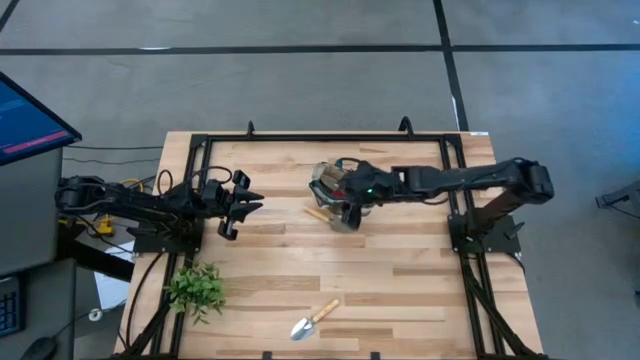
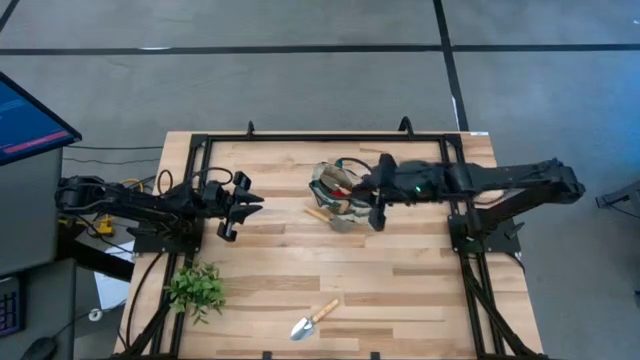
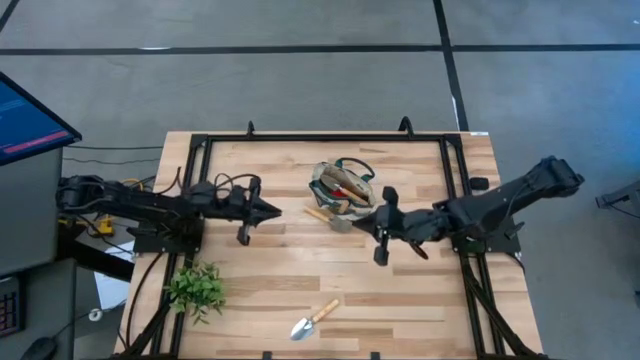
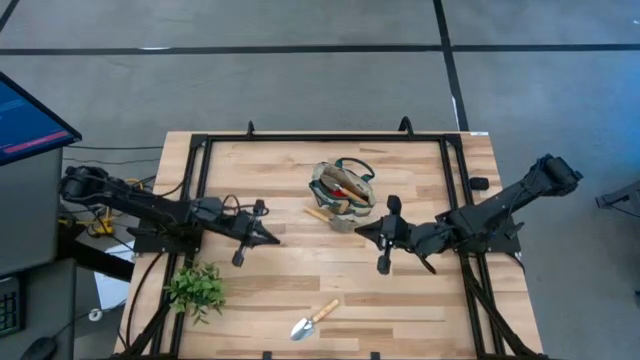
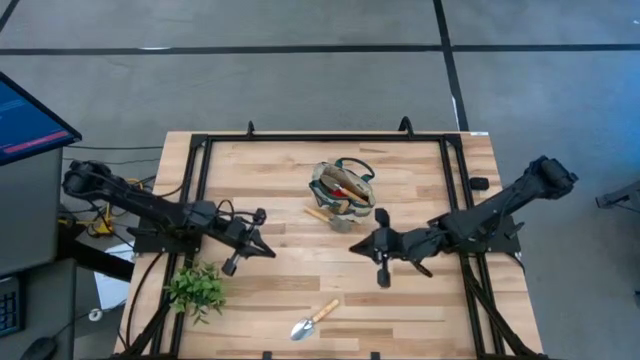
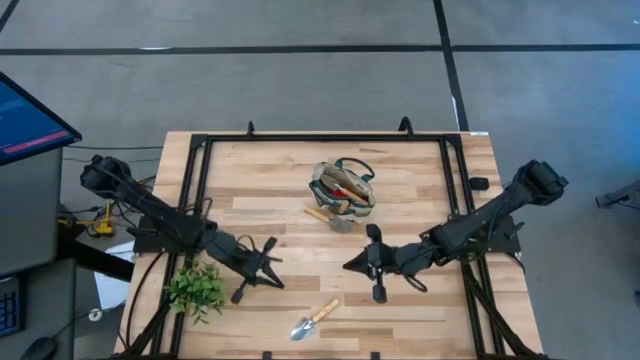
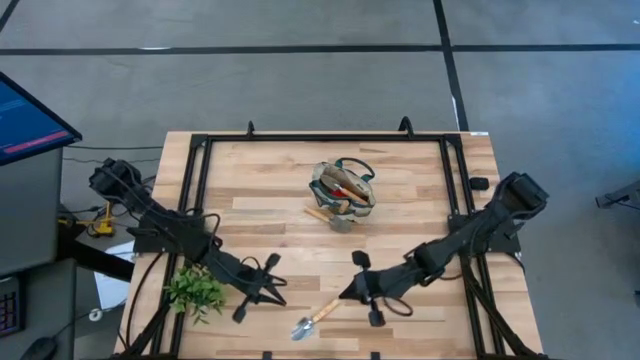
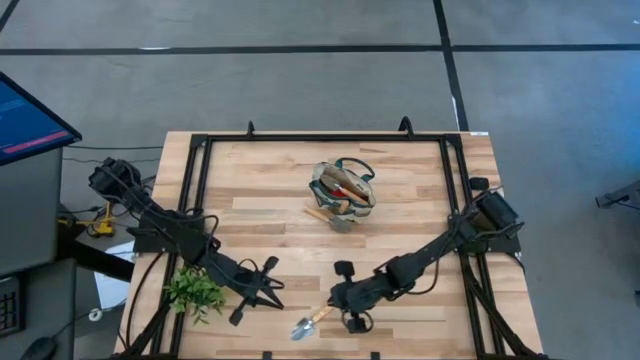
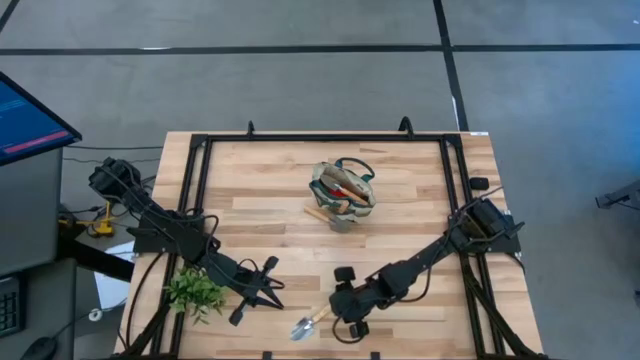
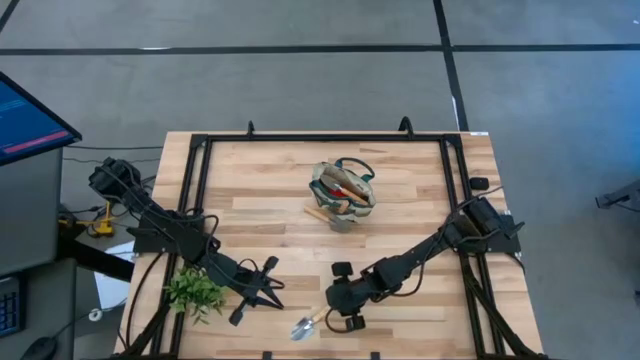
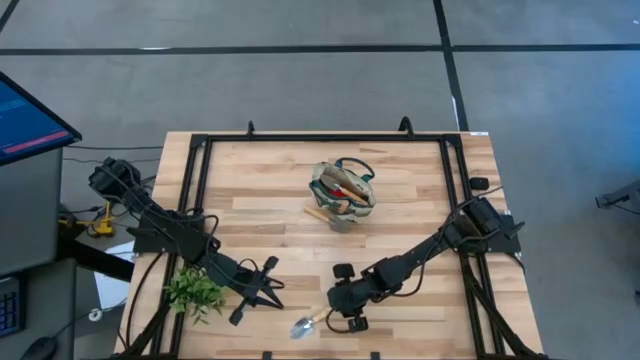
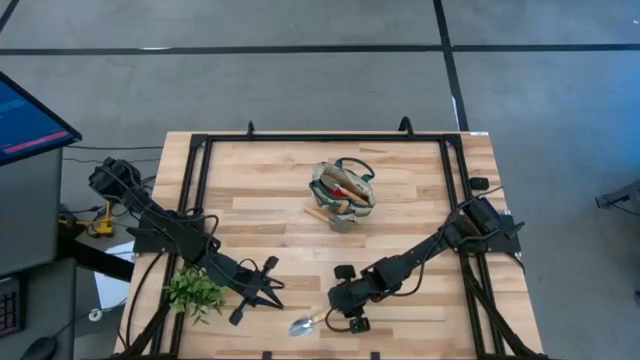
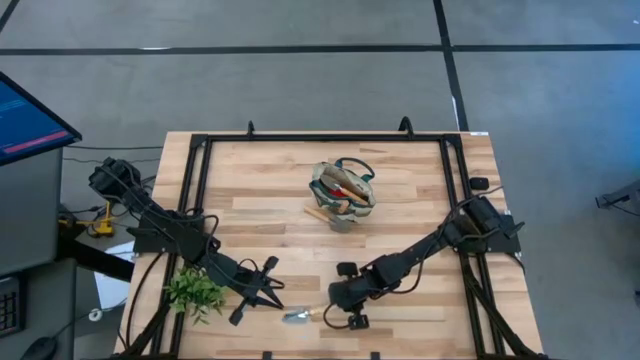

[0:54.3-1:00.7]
Task: Pick & Place Garden tools in Gardening bag
Put the brown trowel into the gardening bag

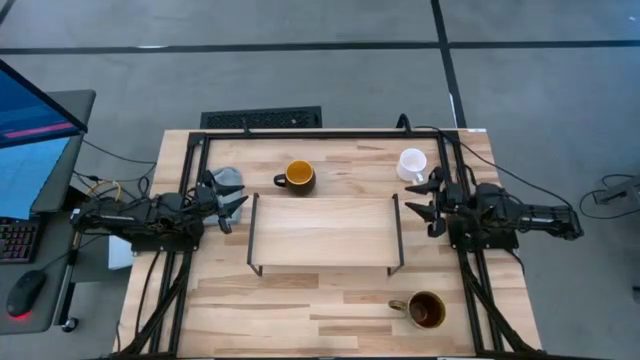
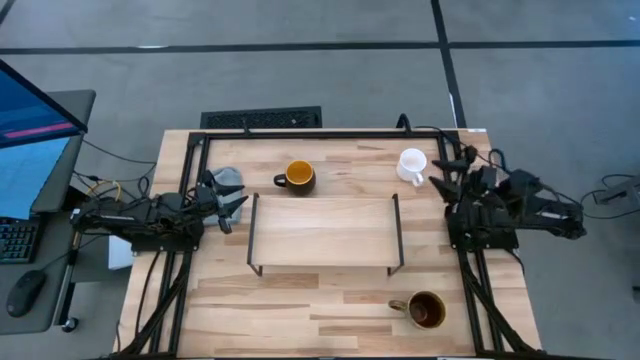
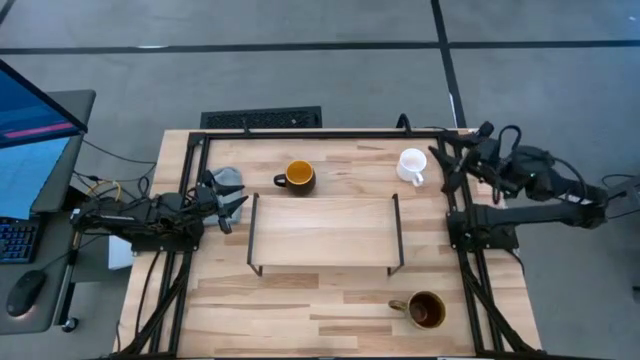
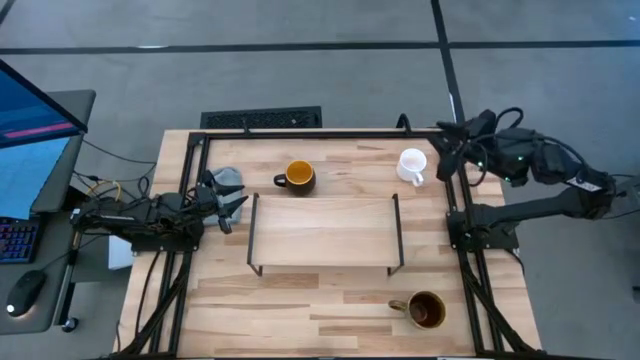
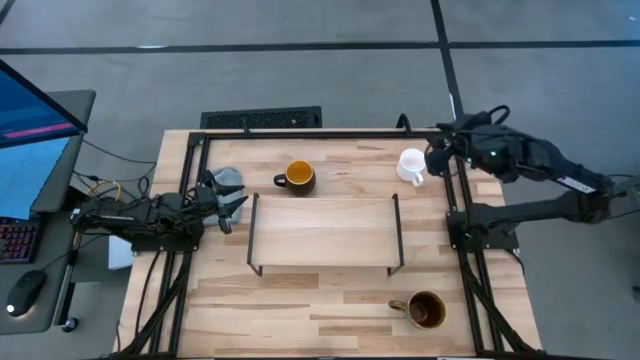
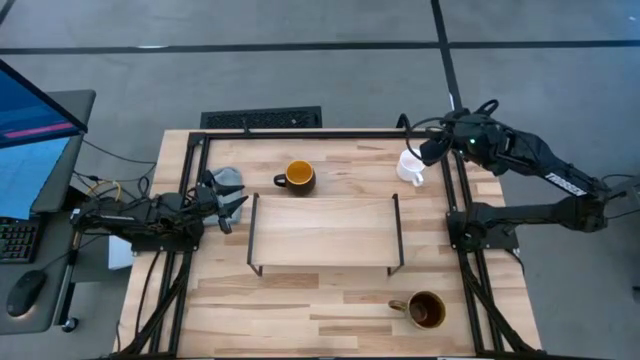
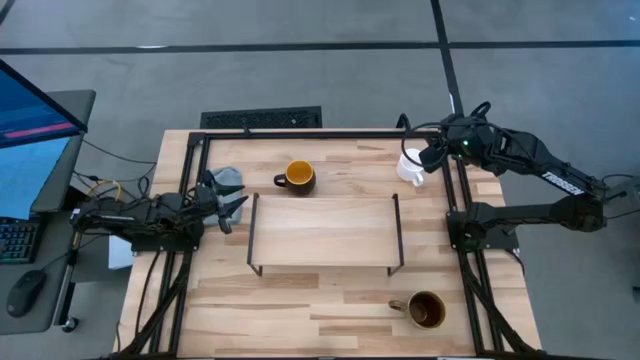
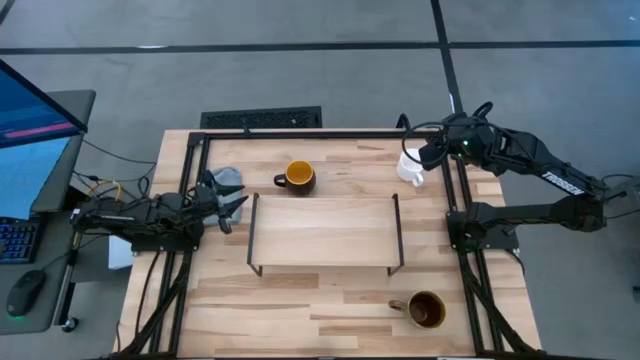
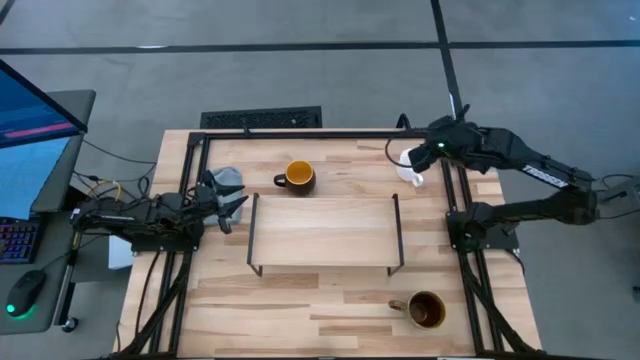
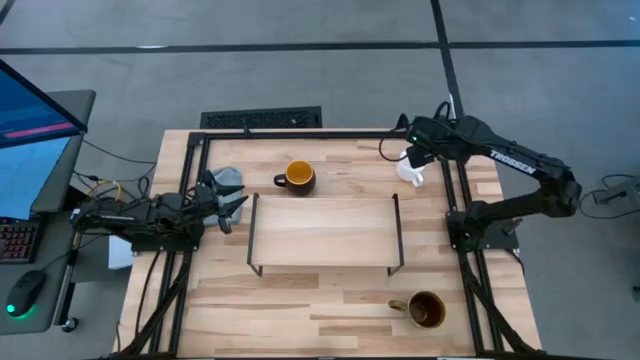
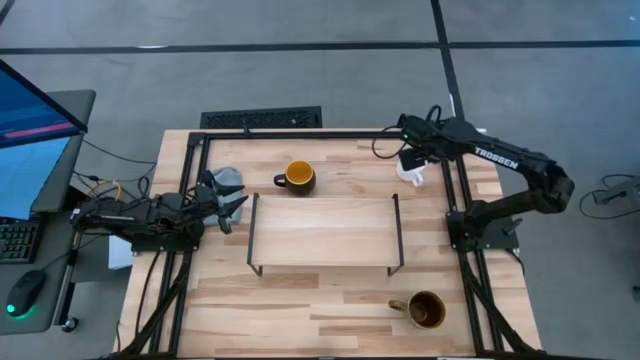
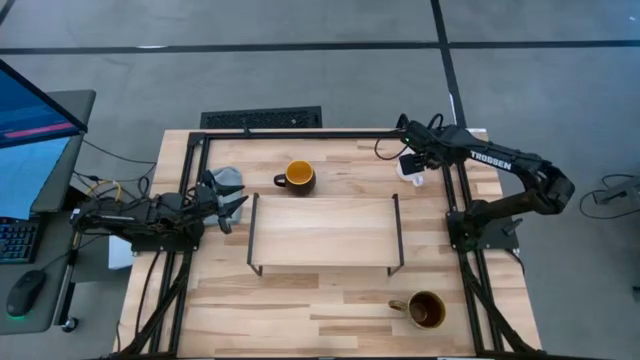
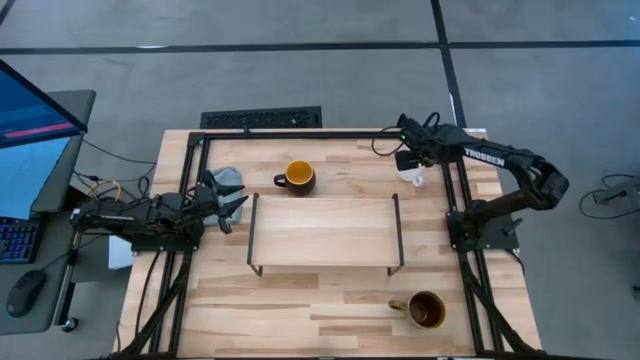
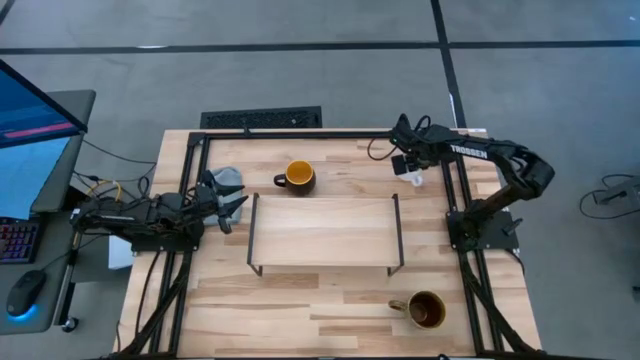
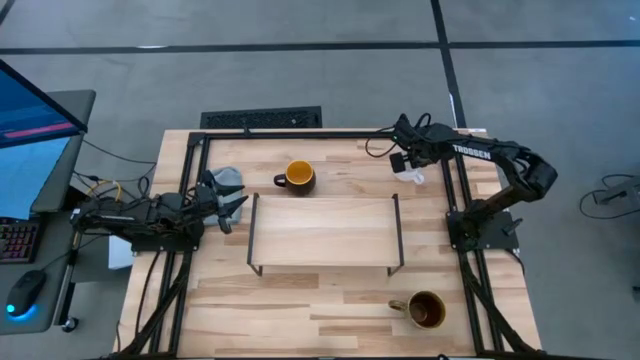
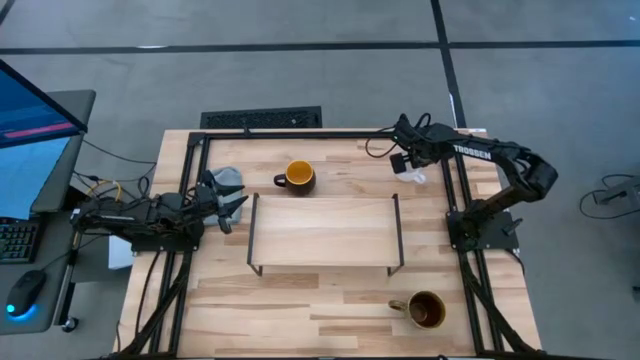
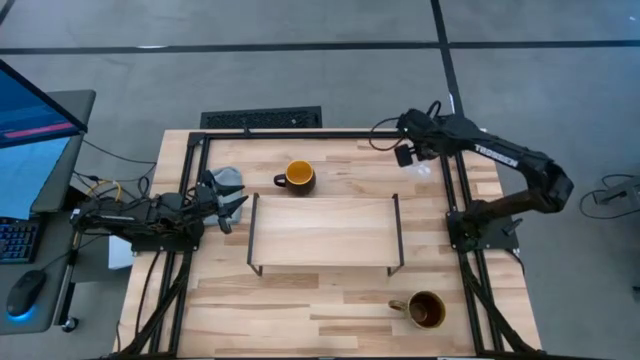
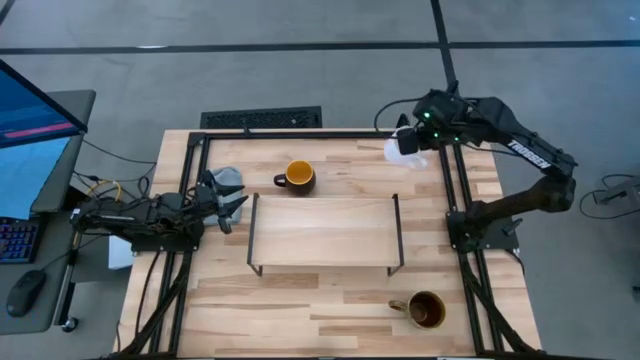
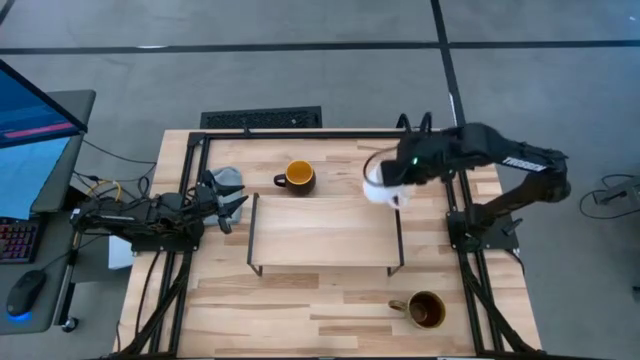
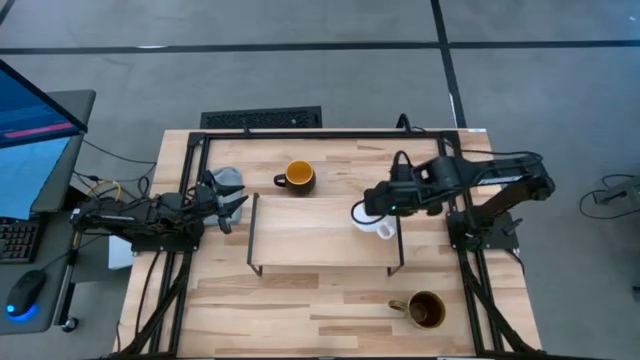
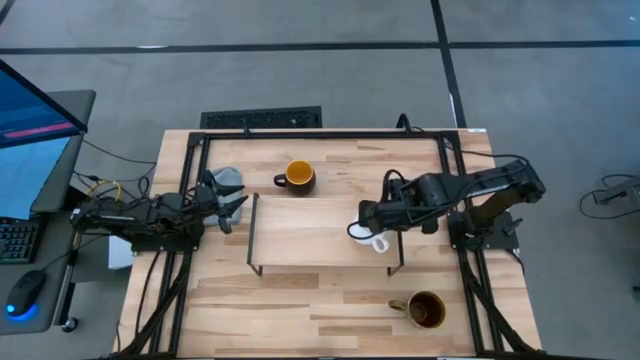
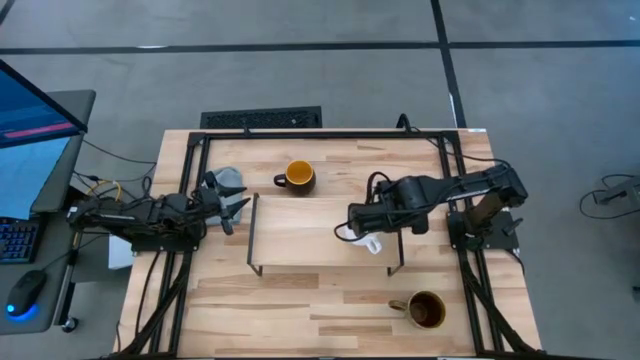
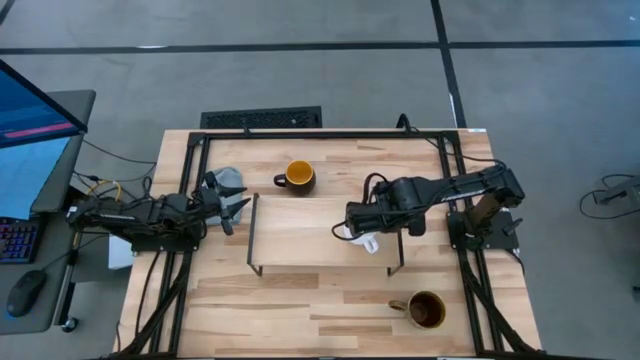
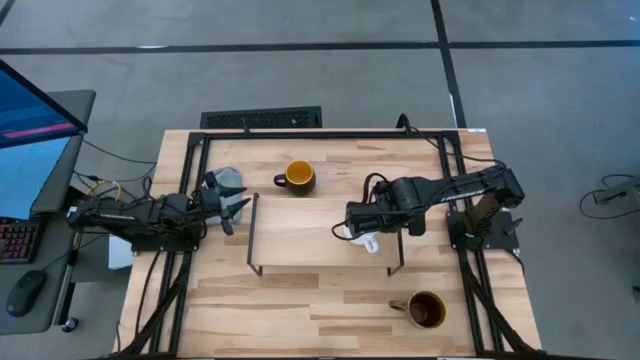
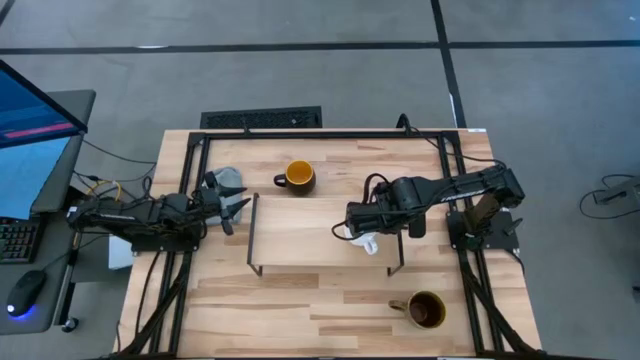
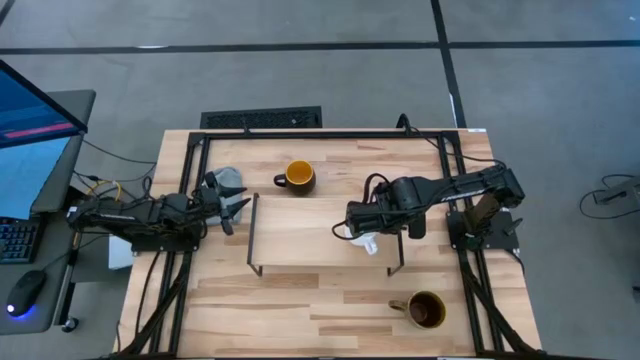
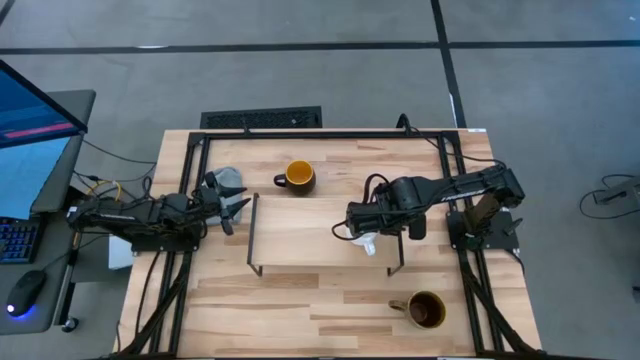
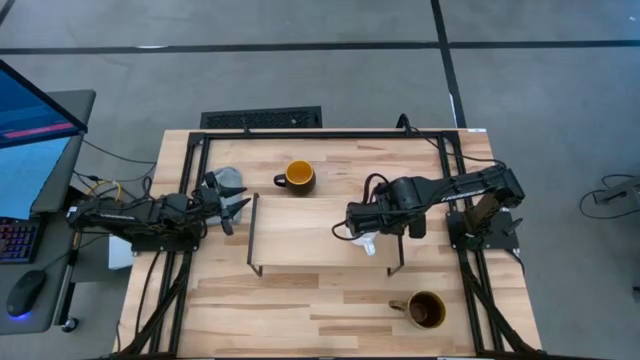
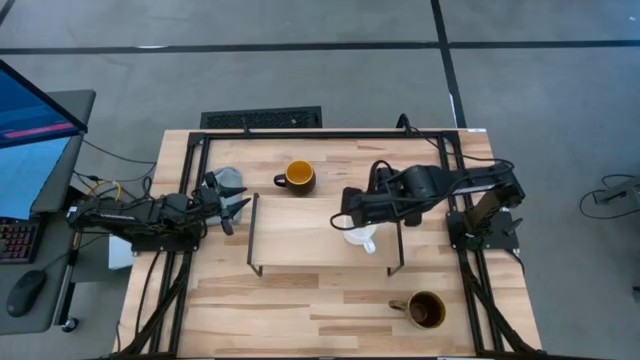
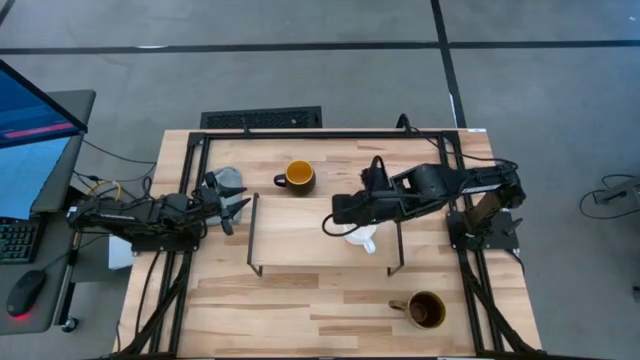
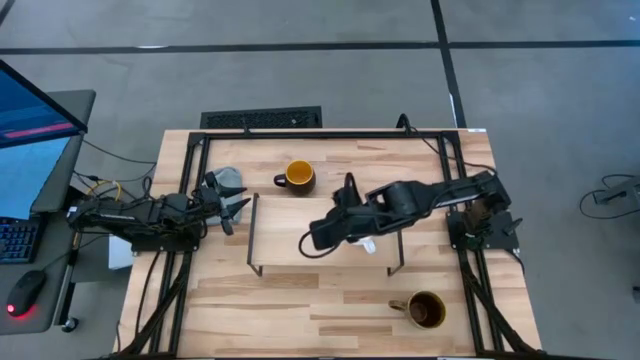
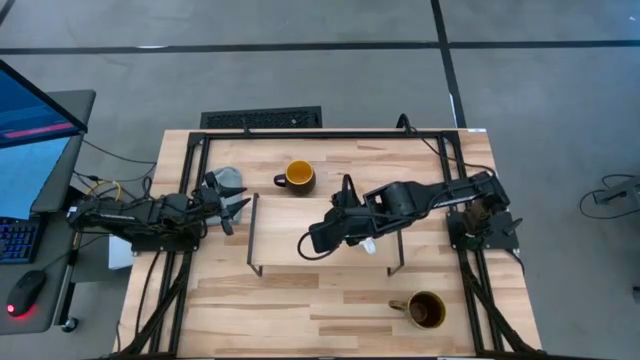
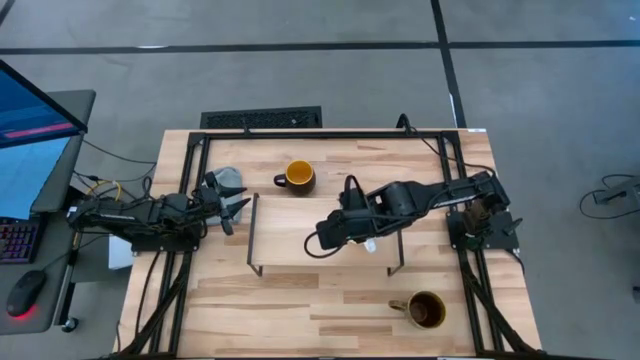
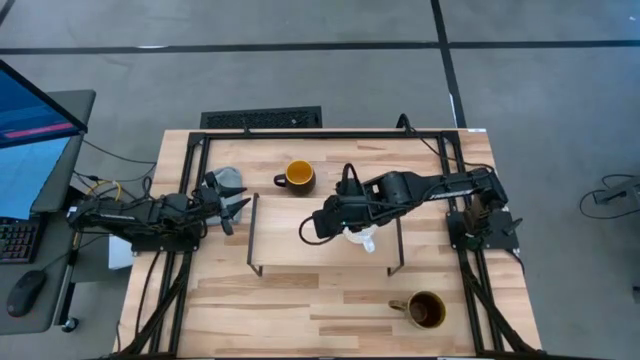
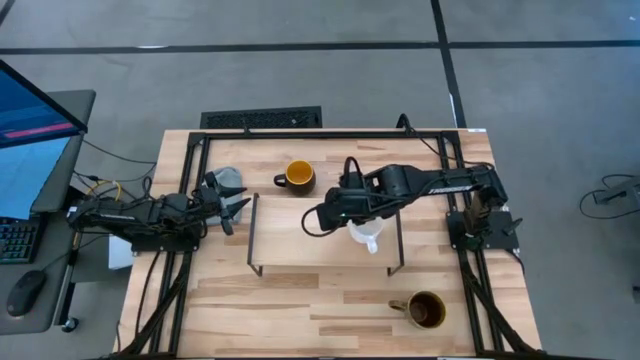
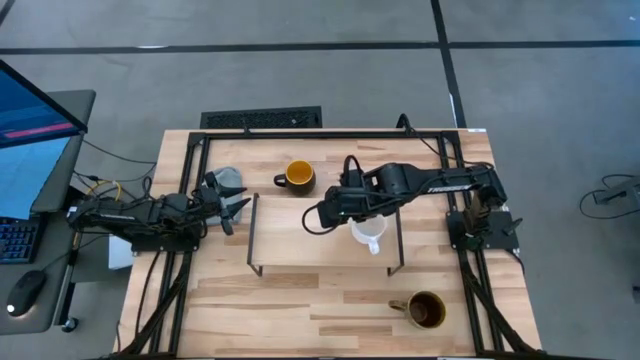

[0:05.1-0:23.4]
Task: Stack small to large cups/mugs on shelf
Put the white mug on the shelf
